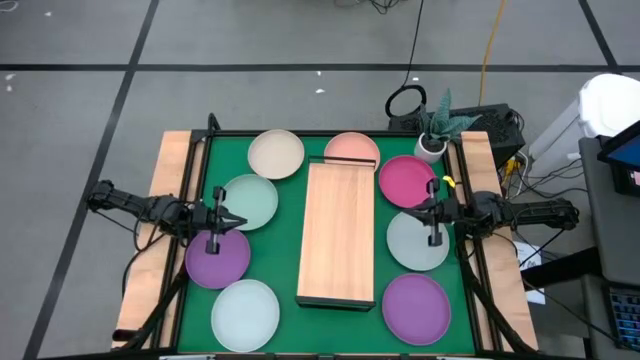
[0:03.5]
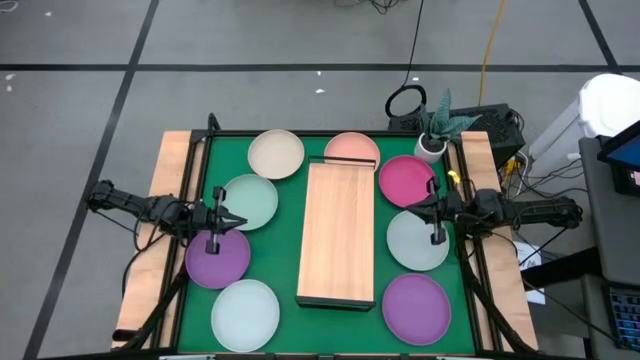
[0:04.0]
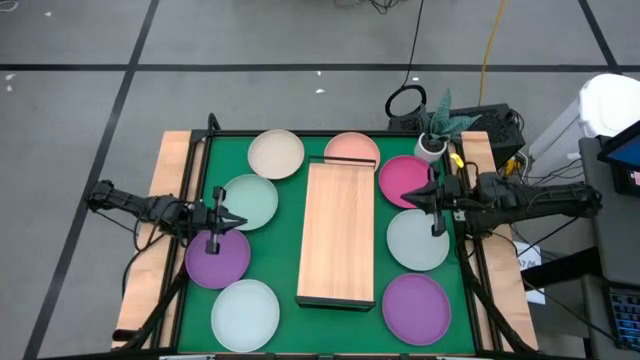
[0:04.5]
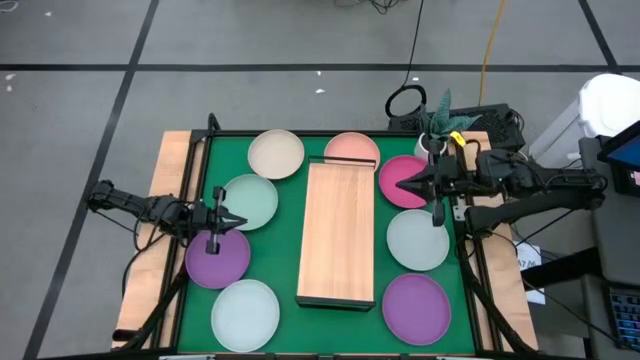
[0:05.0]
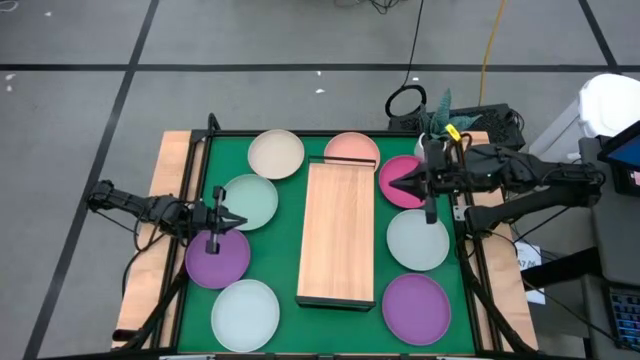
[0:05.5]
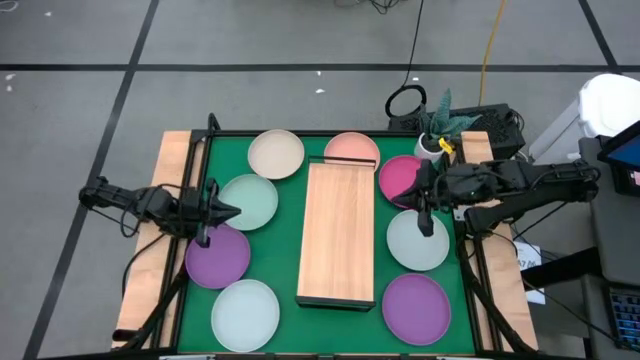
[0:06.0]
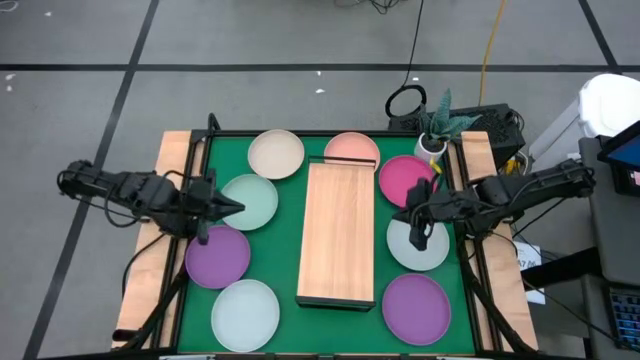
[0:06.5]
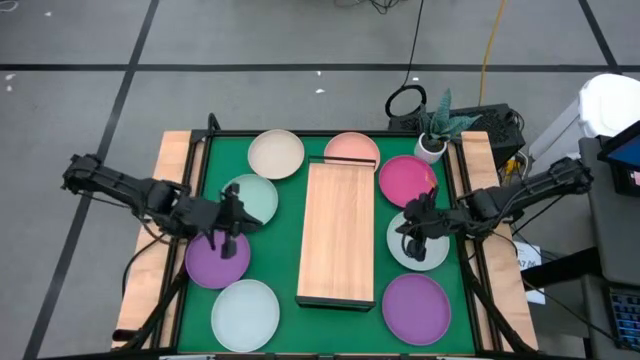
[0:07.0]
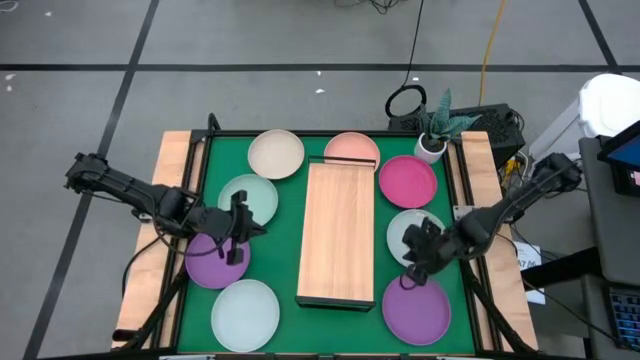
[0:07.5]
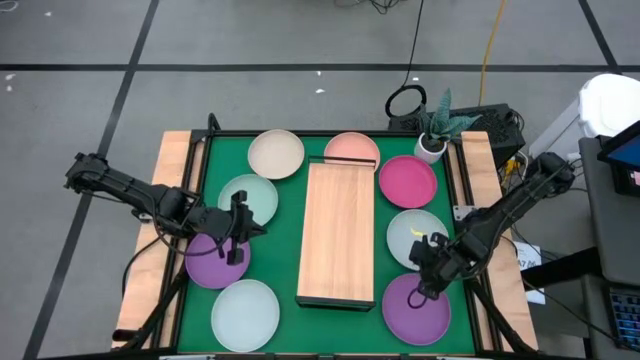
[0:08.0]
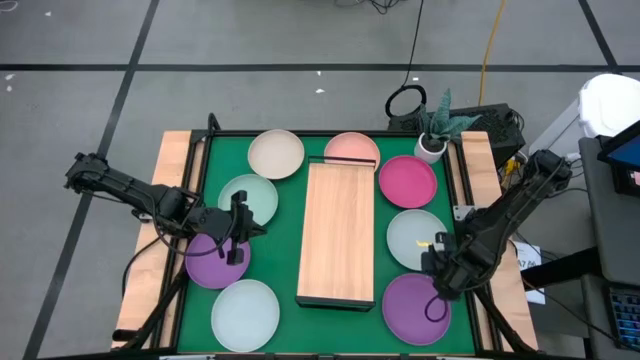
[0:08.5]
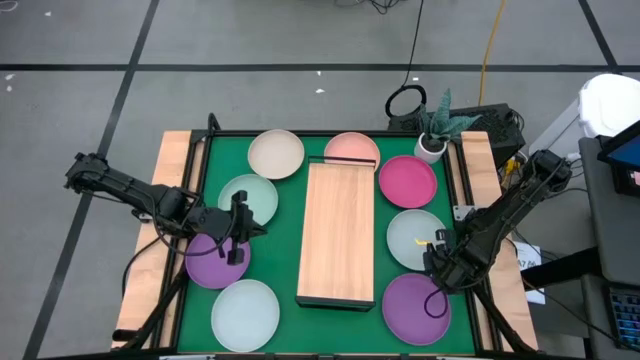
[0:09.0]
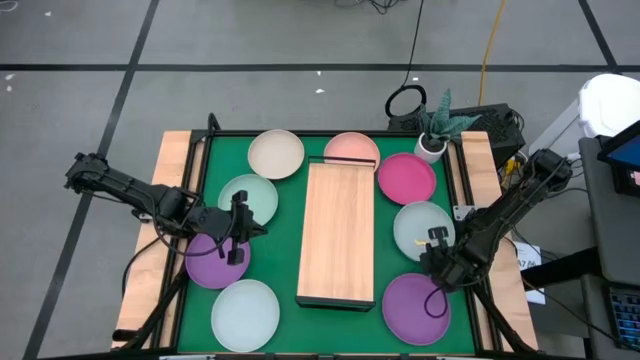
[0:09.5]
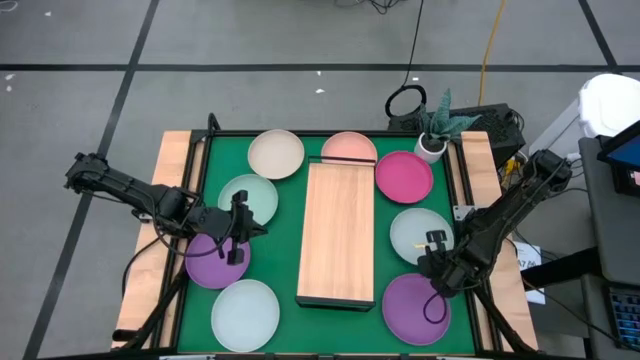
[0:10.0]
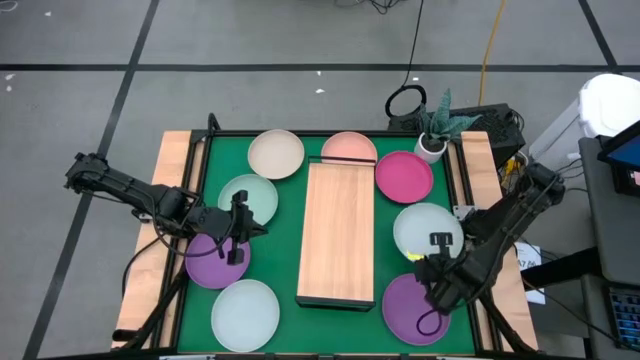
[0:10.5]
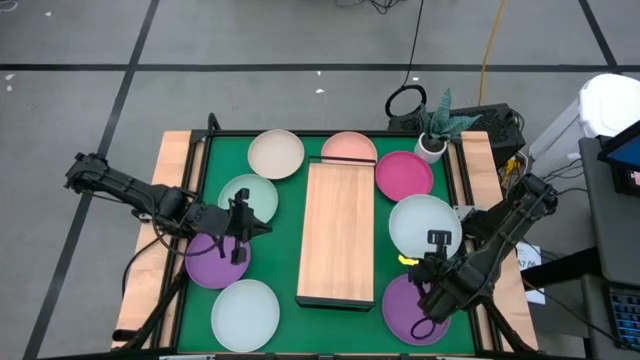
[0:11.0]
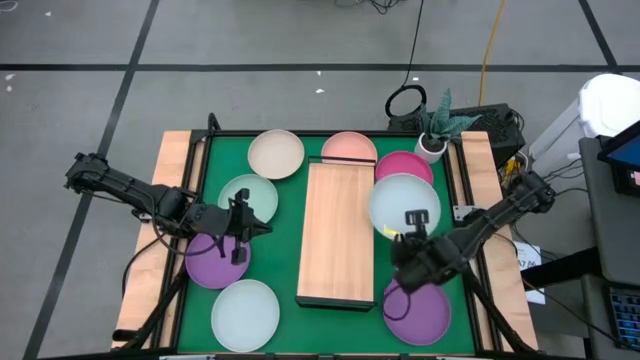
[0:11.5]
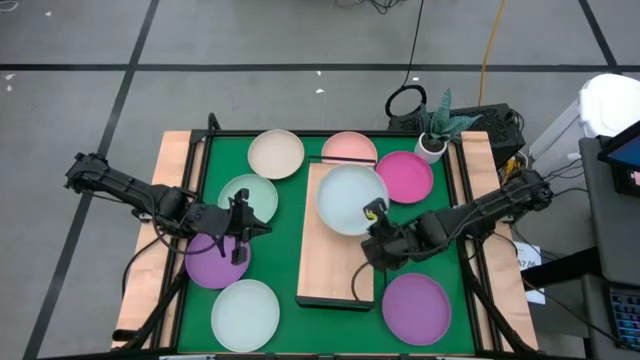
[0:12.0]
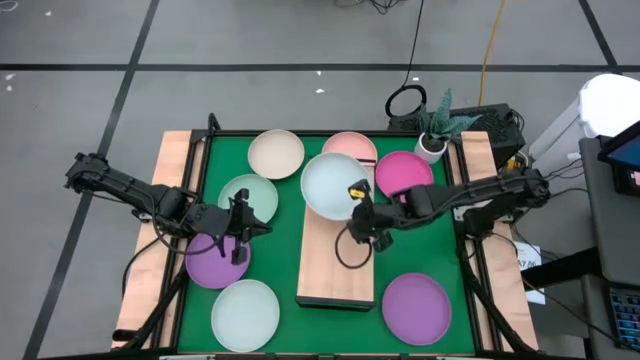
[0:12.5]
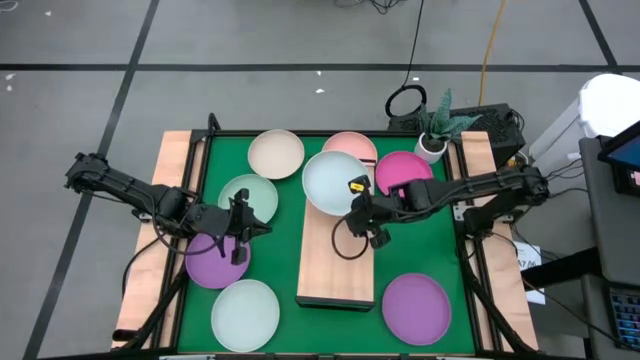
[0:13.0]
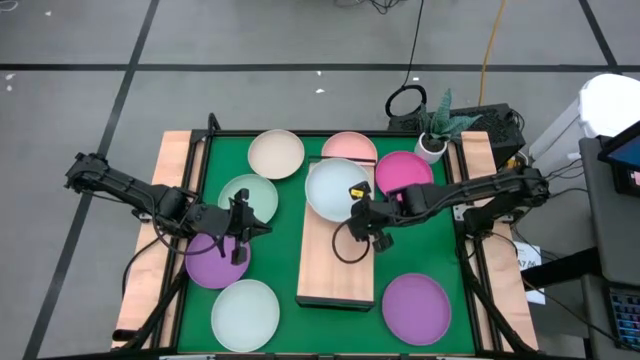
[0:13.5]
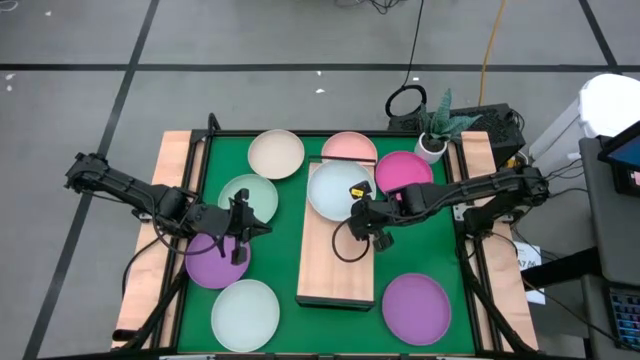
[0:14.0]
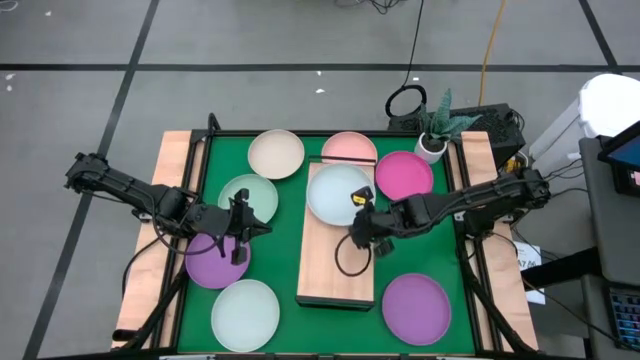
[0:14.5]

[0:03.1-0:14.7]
Task: Place and stack plates onto a shelf
Put the right grey plate on the shelf

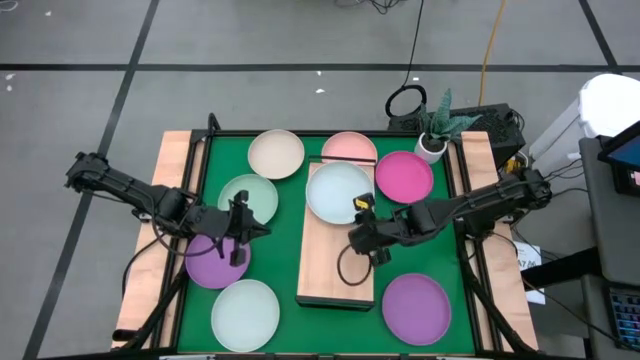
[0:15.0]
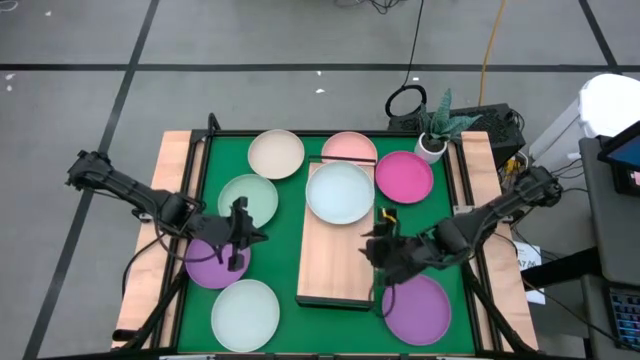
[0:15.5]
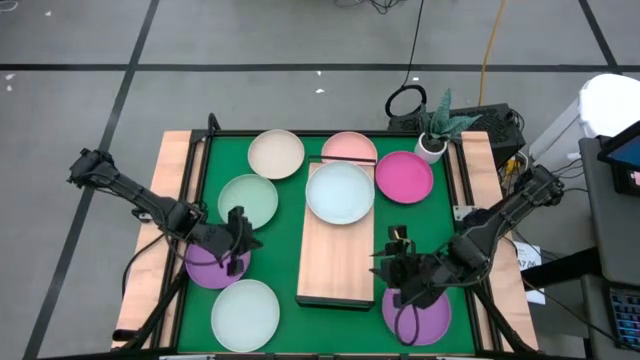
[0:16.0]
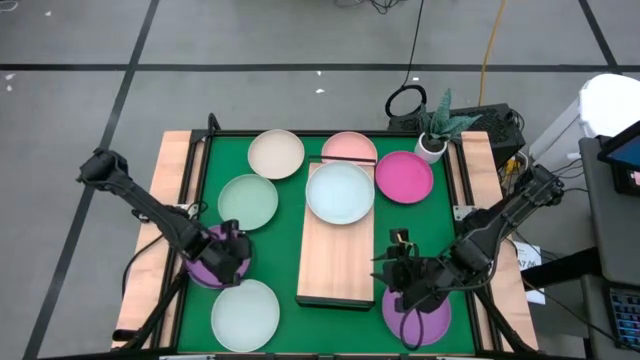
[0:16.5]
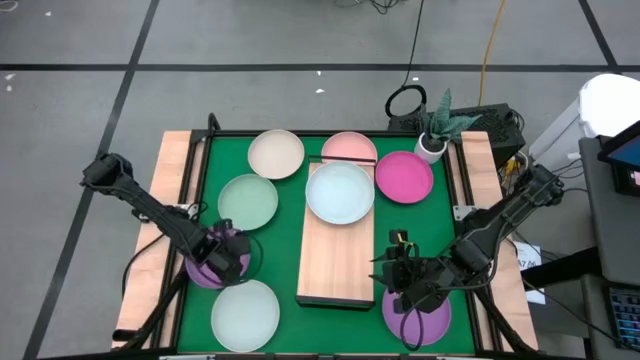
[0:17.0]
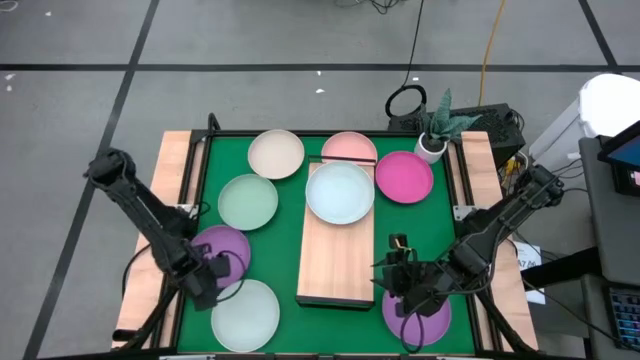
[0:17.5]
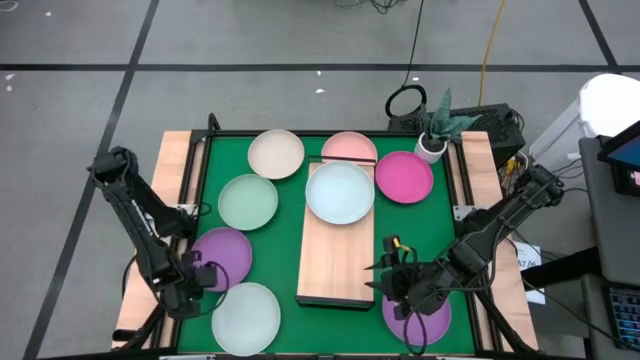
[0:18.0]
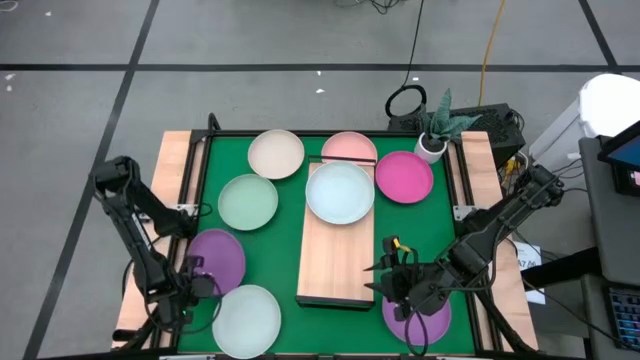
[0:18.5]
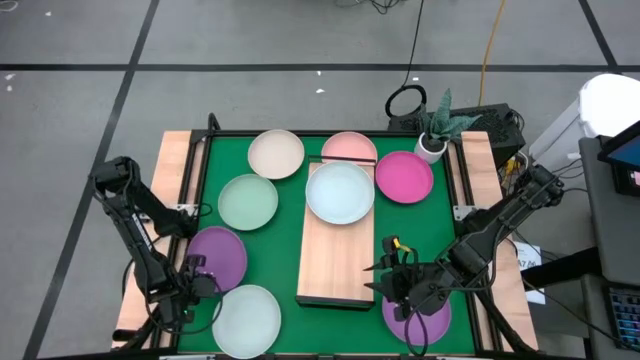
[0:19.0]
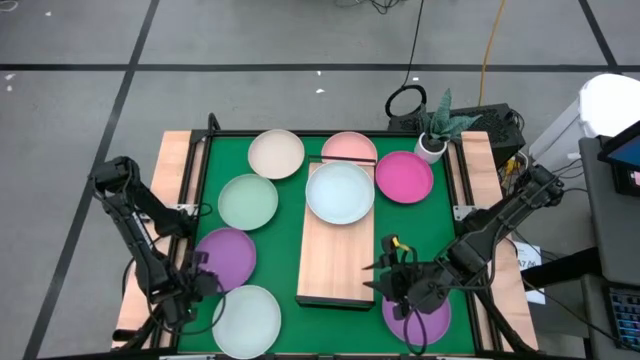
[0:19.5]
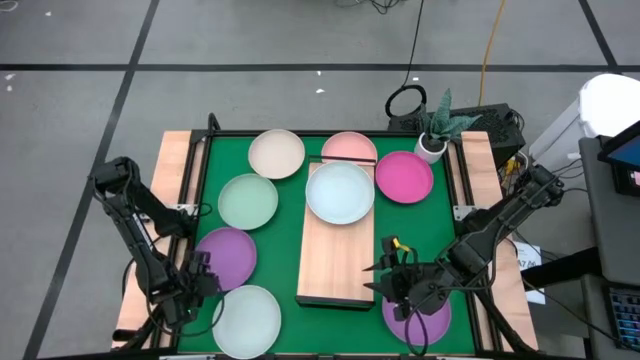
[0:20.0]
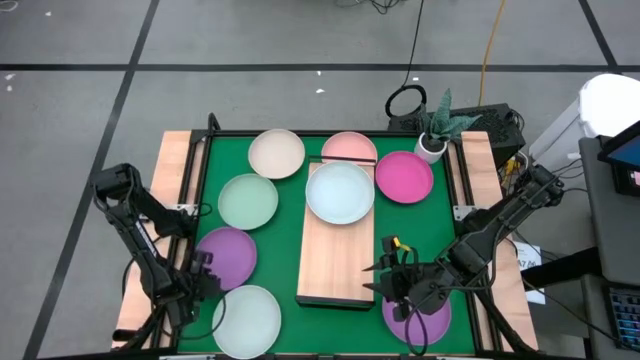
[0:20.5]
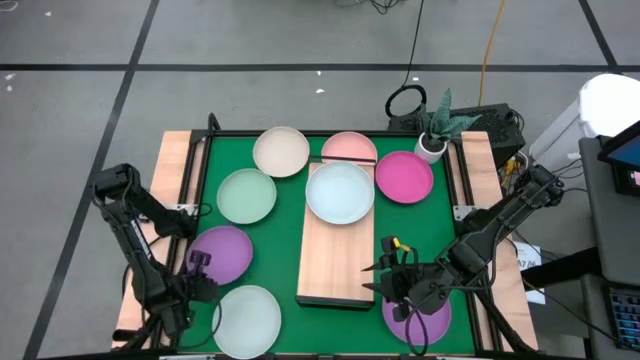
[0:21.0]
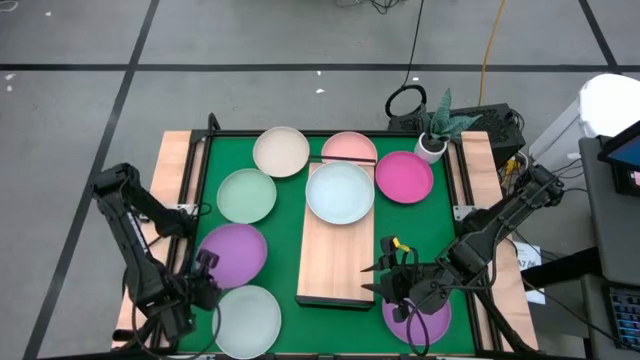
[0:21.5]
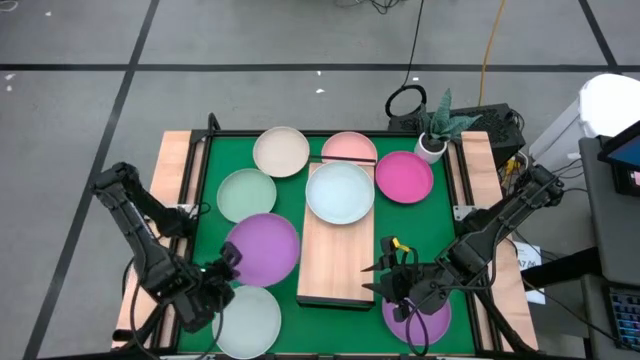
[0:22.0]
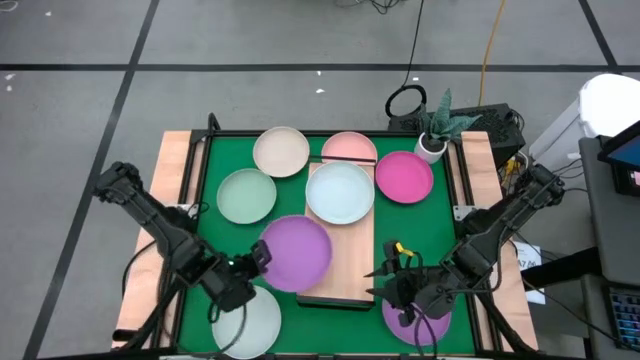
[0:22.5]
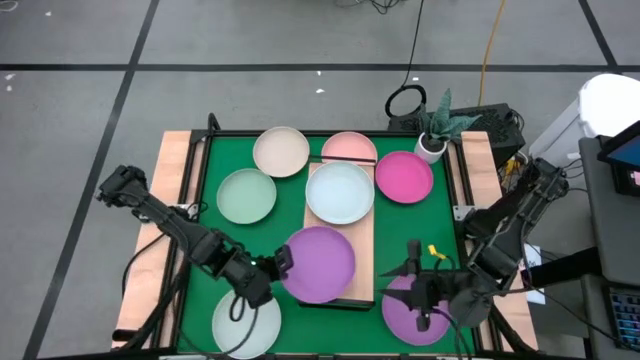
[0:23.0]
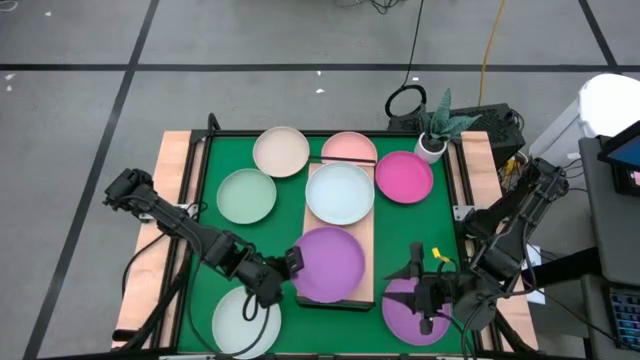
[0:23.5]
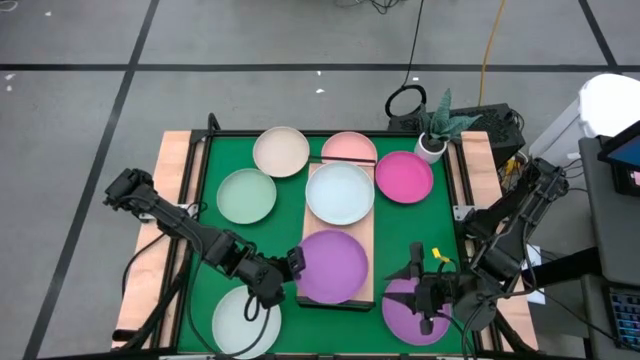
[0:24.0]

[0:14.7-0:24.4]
Put the left purple plate on the shelf

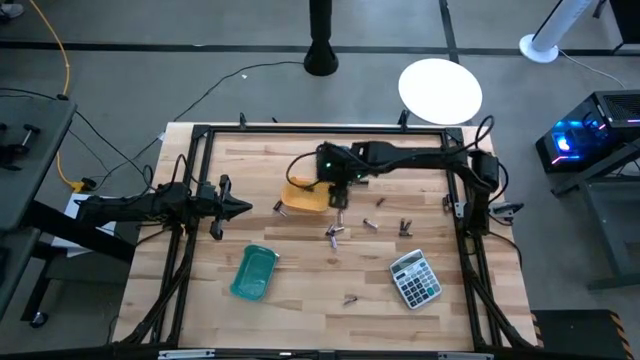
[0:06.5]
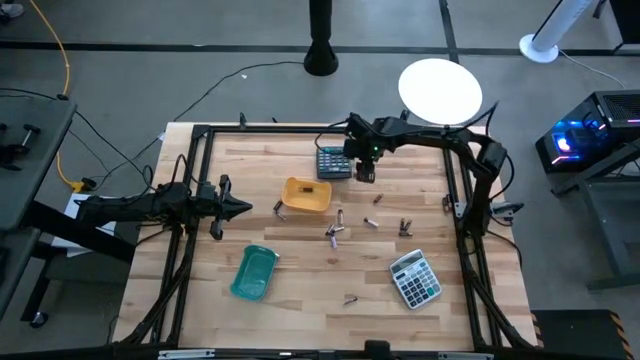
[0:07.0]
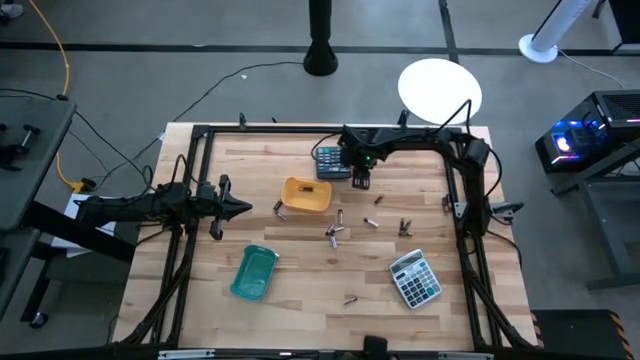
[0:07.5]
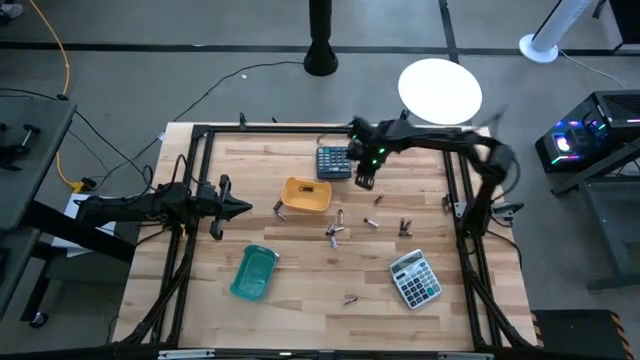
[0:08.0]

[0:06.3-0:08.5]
Task: Sort batteries
Put the black battery into the yellow bin
